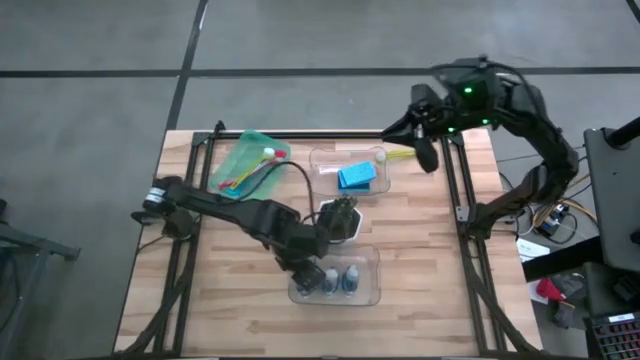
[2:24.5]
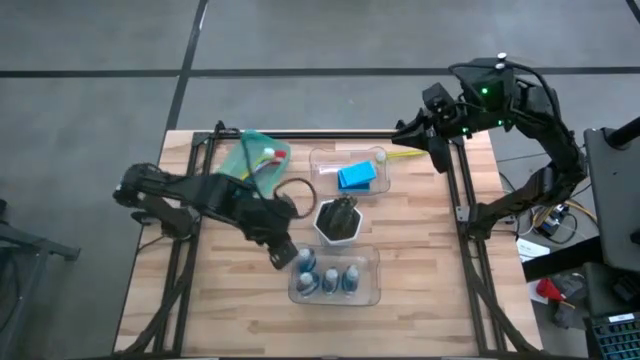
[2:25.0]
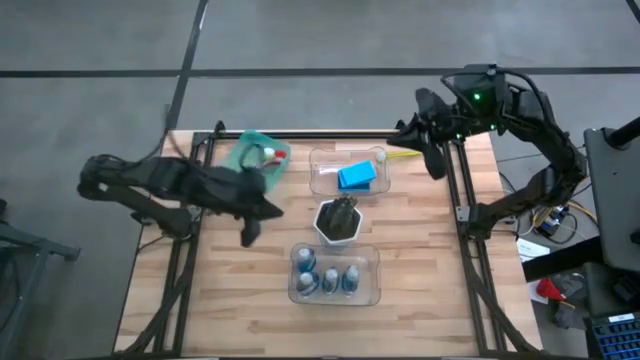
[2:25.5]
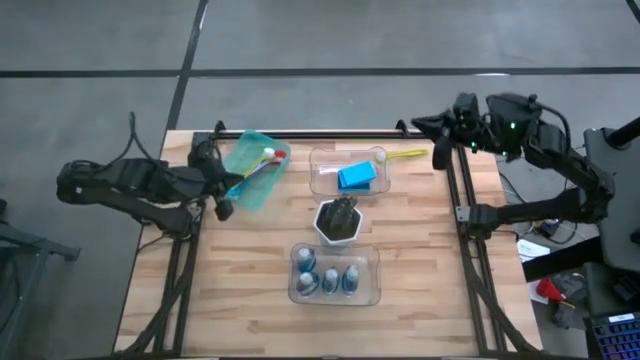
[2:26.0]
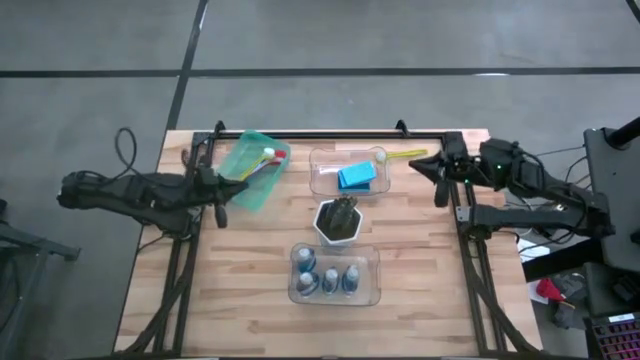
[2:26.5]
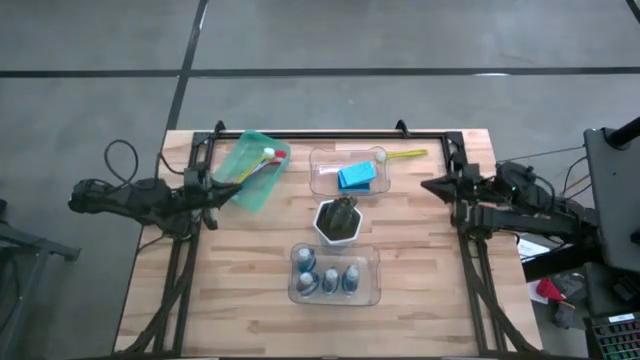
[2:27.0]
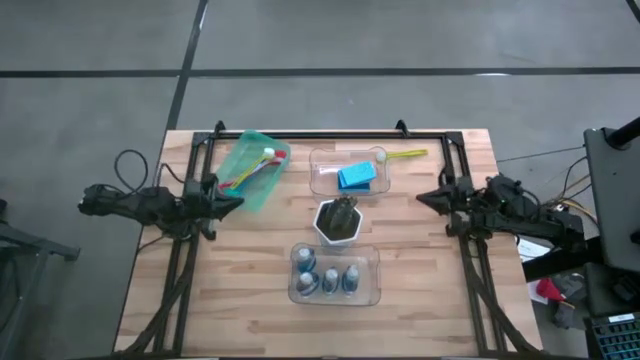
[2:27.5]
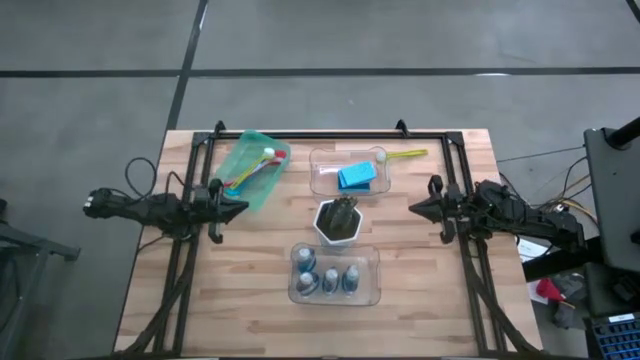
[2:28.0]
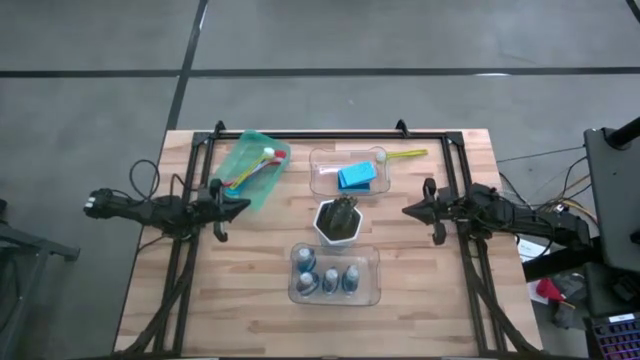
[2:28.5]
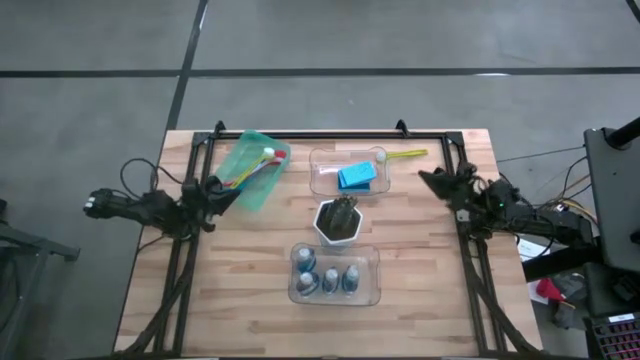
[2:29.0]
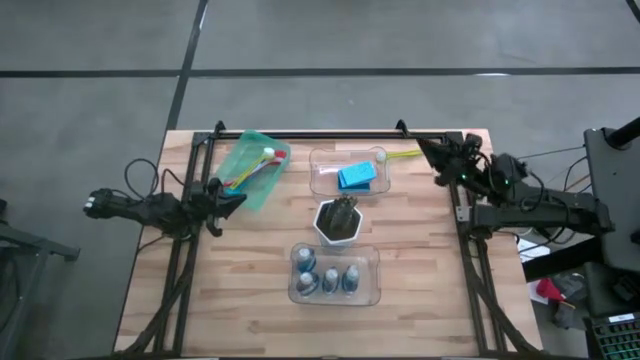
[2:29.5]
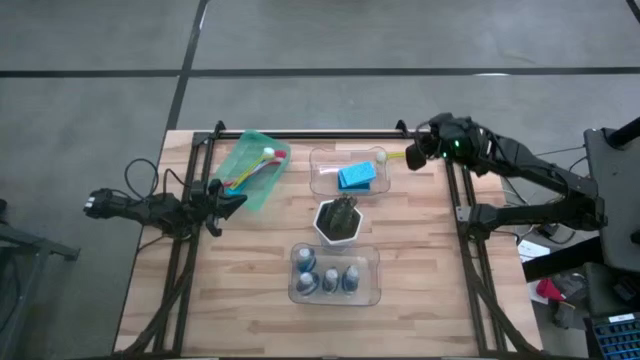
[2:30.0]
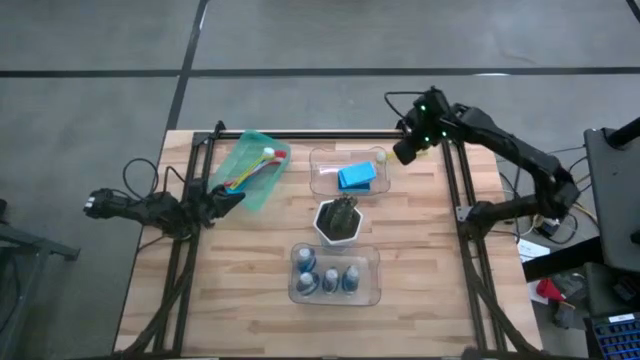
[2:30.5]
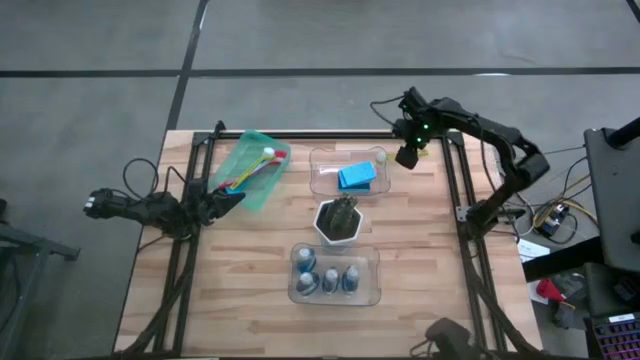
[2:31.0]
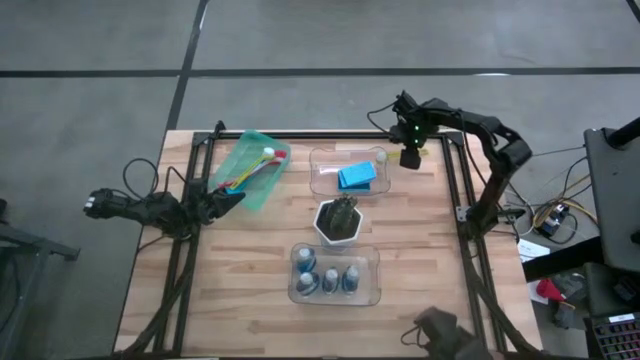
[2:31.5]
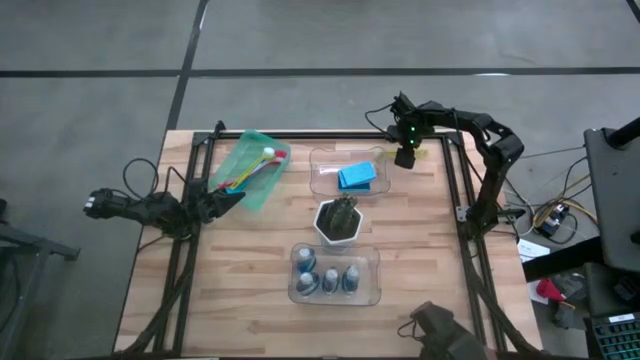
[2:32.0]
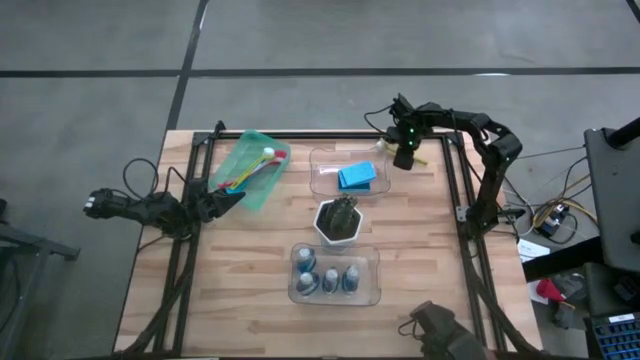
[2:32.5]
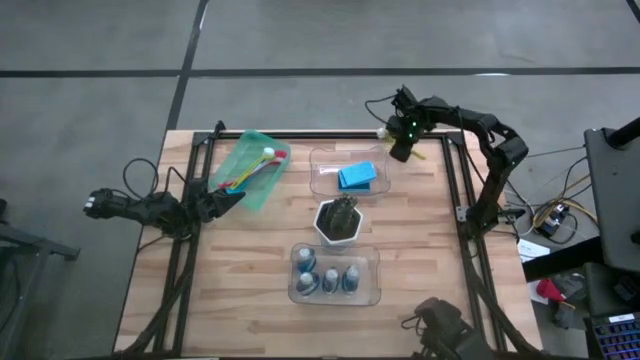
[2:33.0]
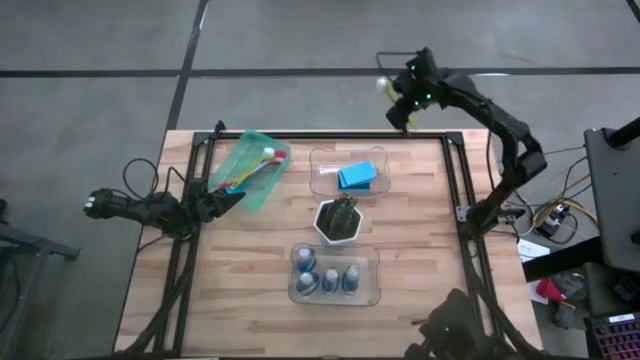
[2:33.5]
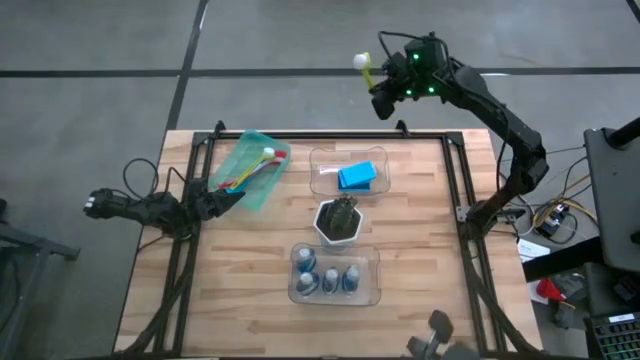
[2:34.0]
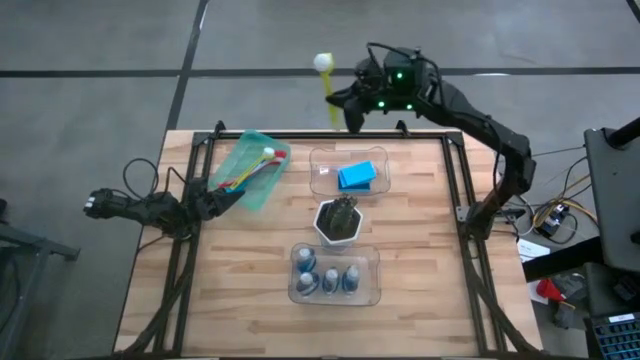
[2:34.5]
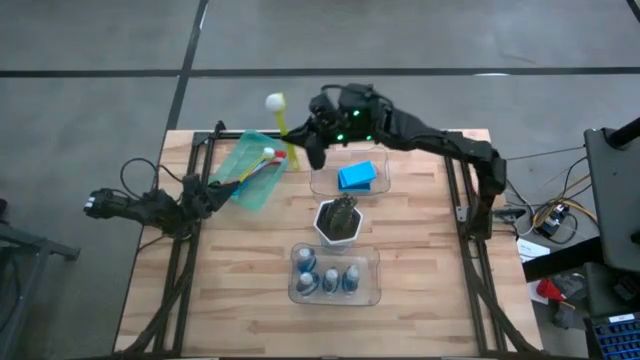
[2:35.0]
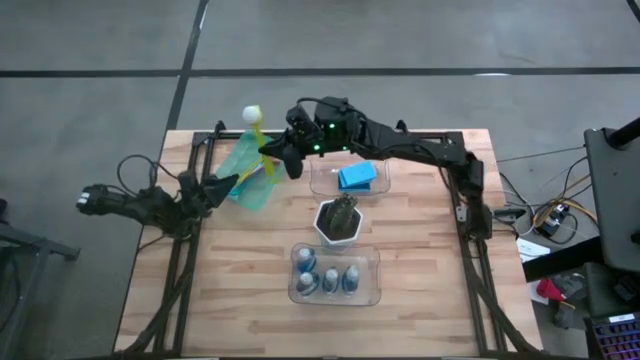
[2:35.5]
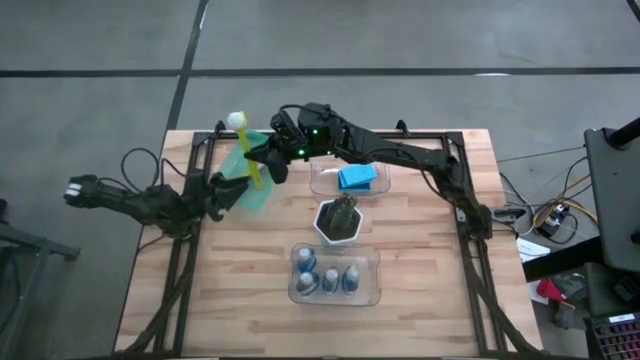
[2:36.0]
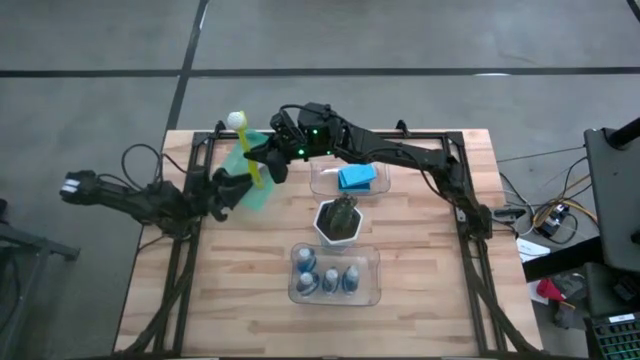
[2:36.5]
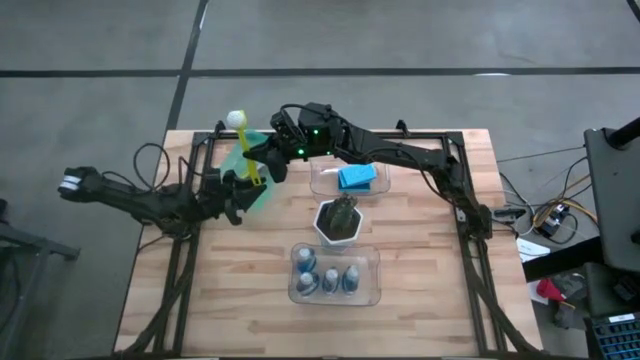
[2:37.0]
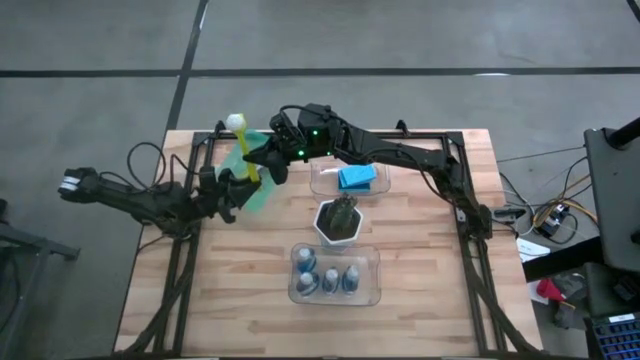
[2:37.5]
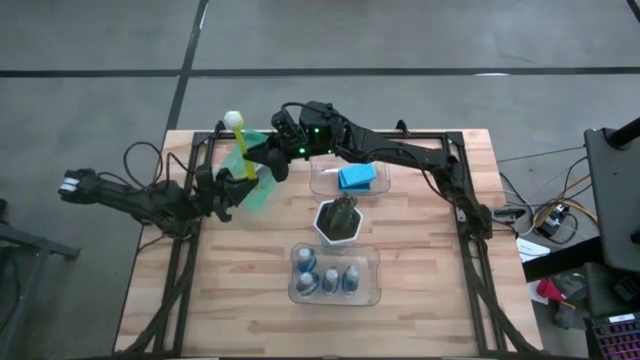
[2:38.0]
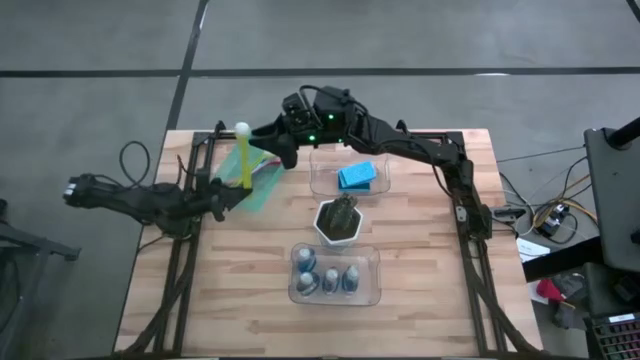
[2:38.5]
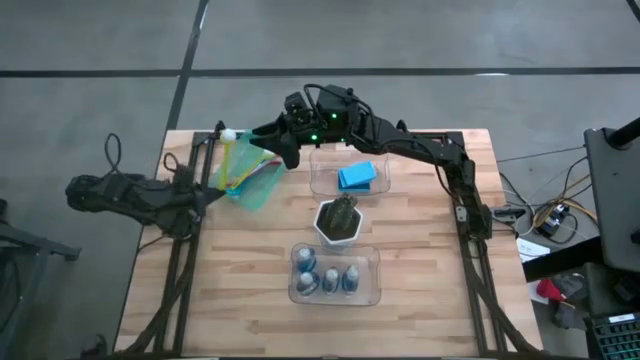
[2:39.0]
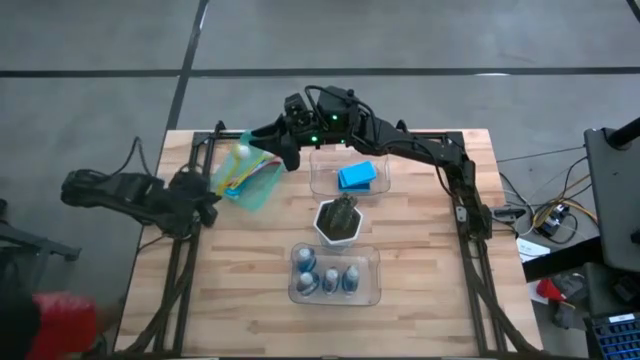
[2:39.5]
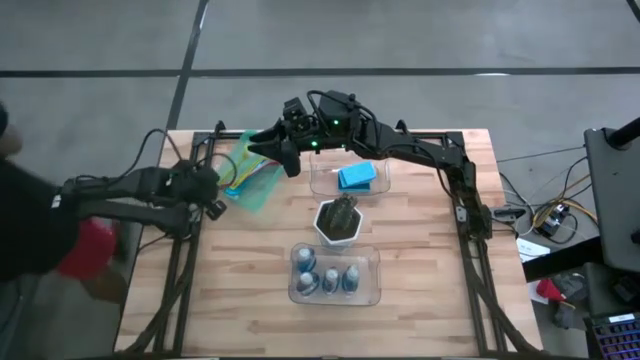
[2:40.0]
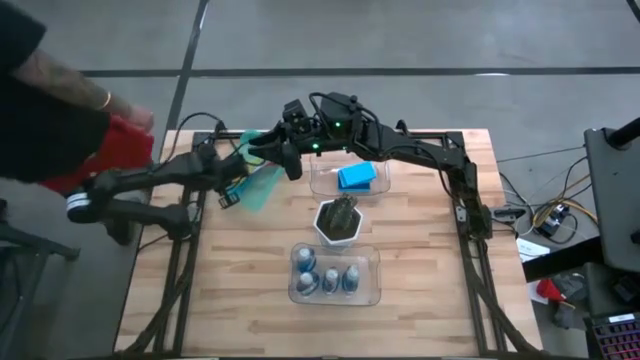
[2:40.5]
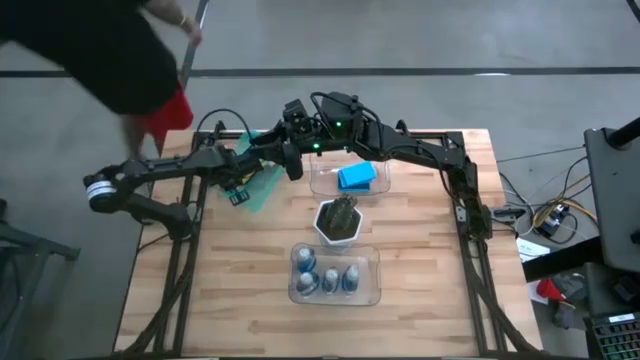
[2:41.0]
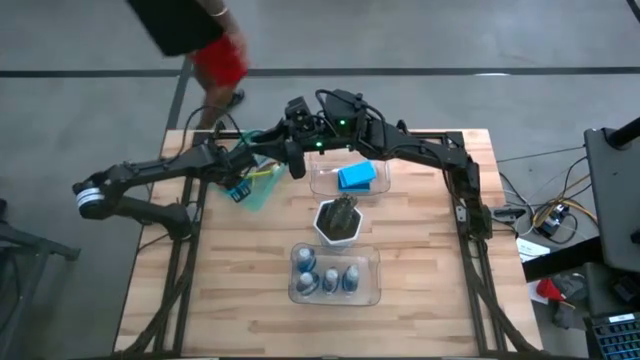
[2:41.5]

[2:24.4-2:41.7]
Task: Pick & Place Kitchen Sink Supplies
Put the light green dishwashing brush into the light blue bin

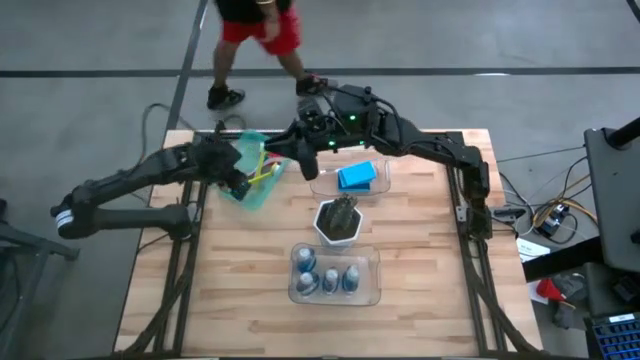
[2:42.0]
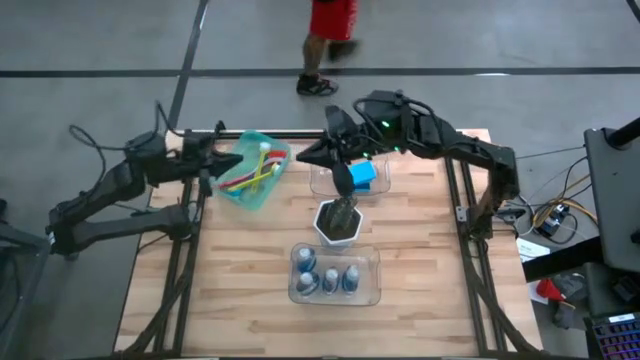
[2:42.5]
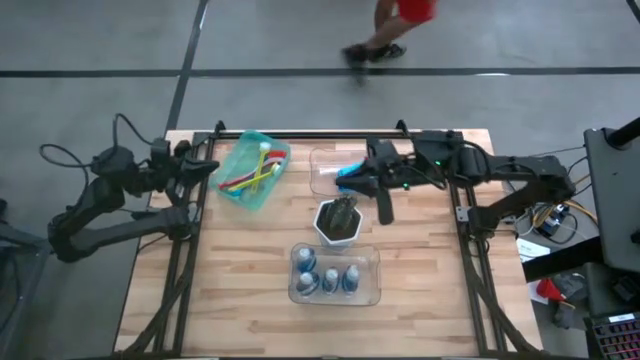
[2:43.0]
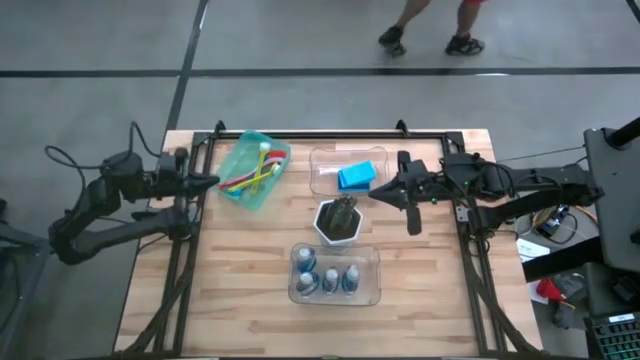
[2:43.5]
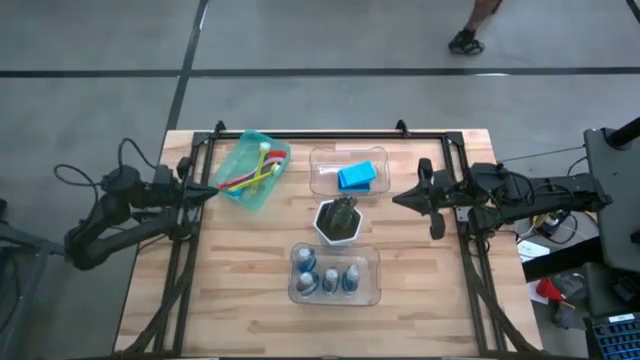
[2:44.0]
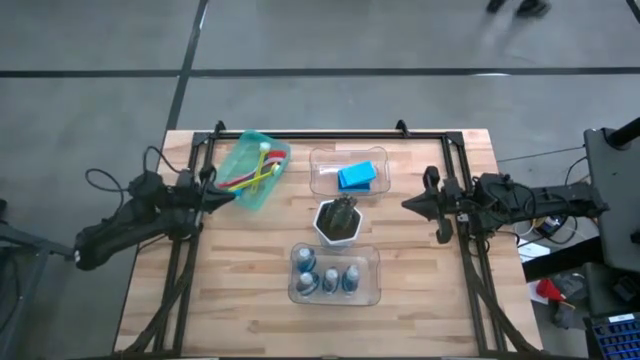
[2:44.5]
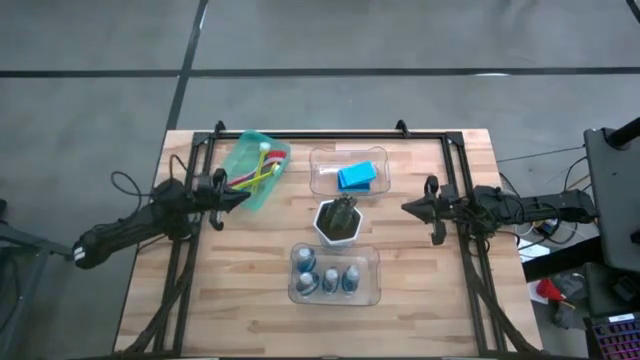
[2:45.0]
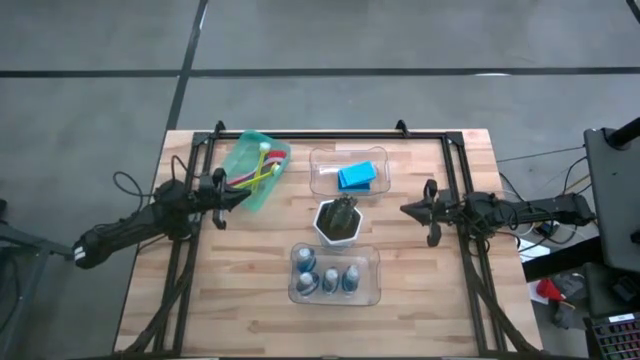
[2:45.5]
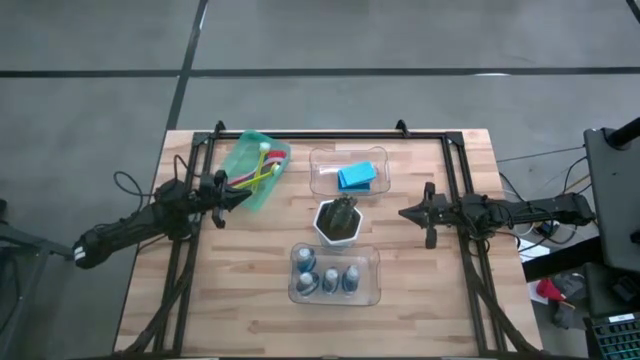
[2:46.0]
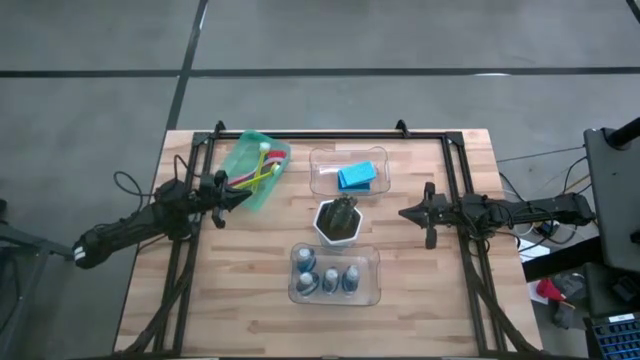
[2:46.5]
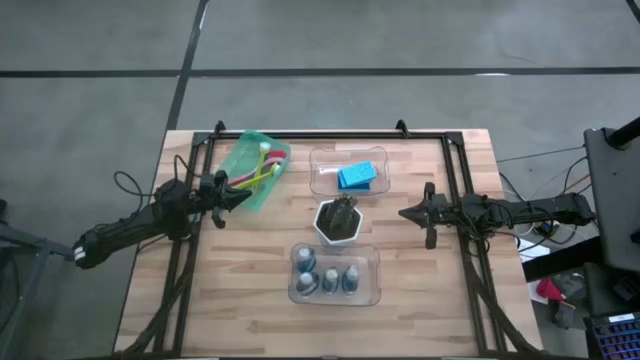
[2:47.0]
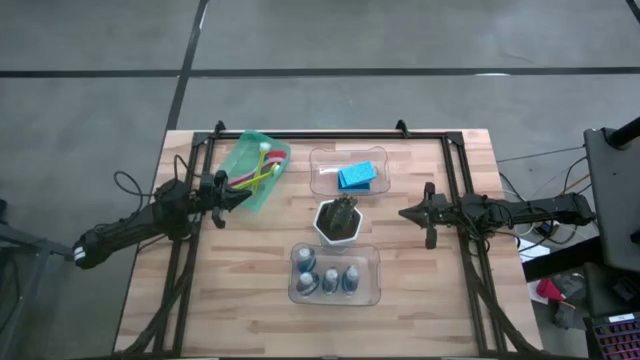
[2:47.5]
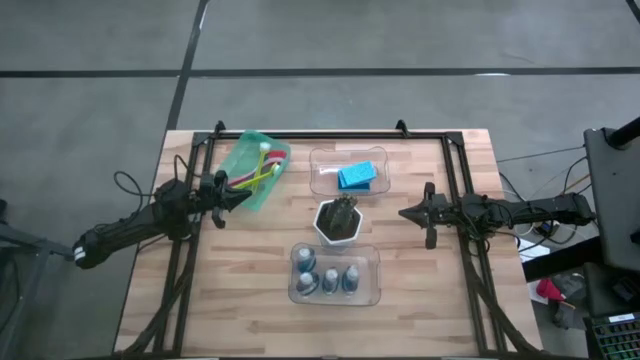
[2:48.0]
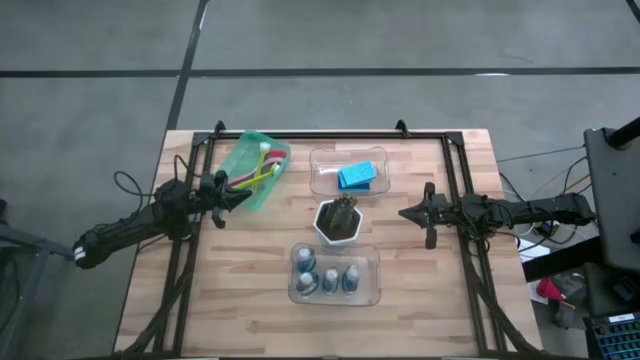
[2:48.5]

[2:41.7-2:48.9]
Return to Home Position
